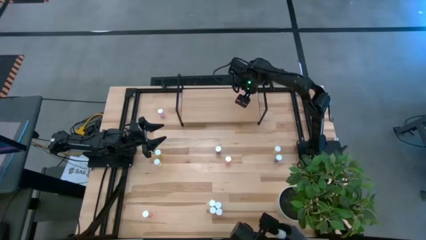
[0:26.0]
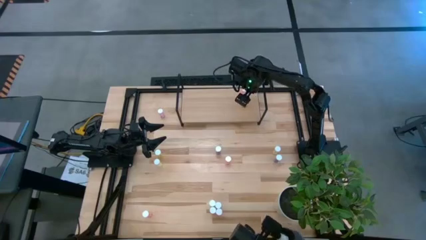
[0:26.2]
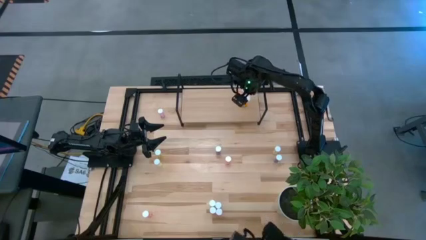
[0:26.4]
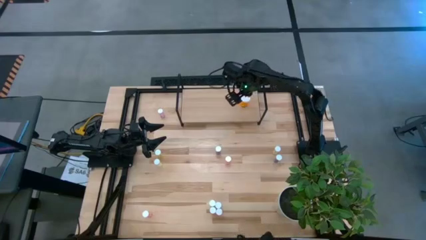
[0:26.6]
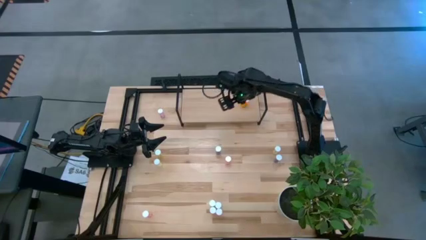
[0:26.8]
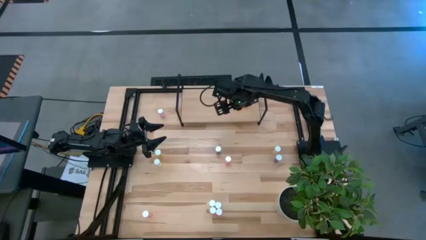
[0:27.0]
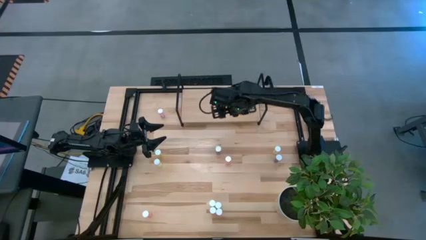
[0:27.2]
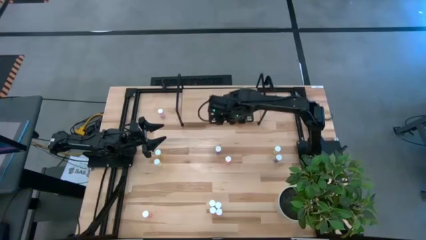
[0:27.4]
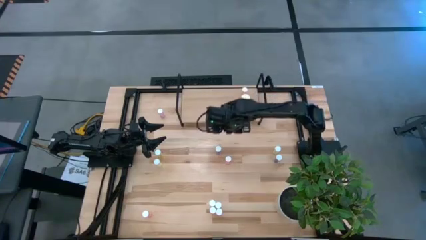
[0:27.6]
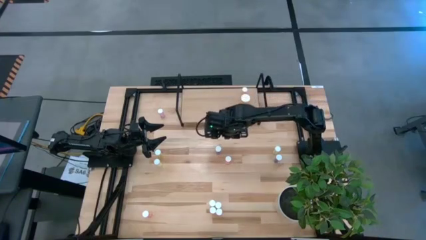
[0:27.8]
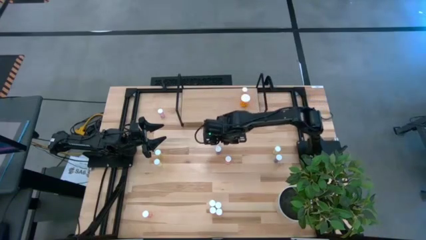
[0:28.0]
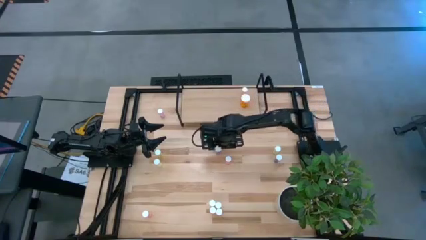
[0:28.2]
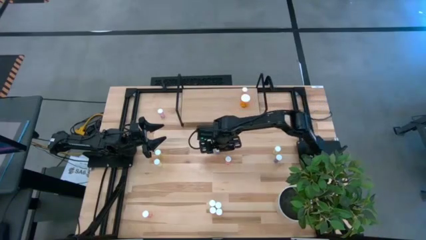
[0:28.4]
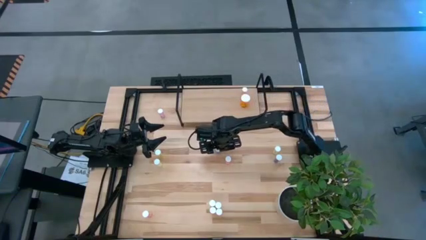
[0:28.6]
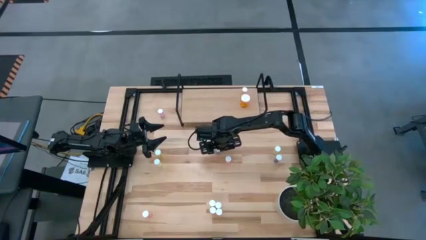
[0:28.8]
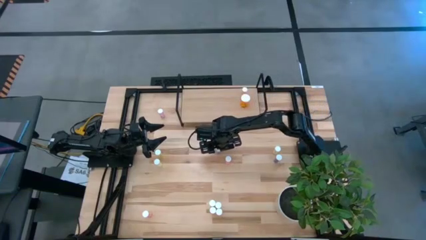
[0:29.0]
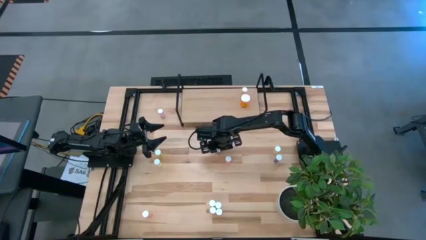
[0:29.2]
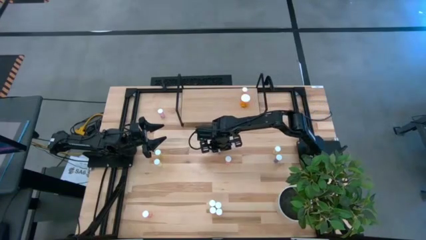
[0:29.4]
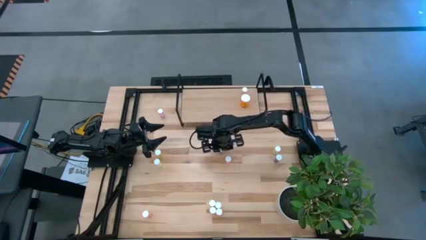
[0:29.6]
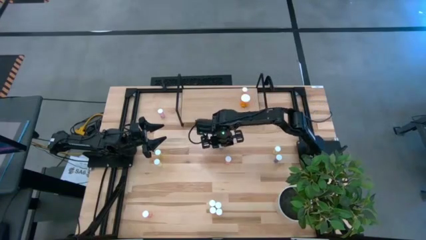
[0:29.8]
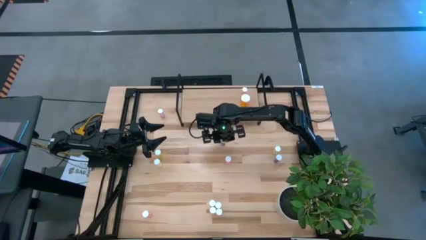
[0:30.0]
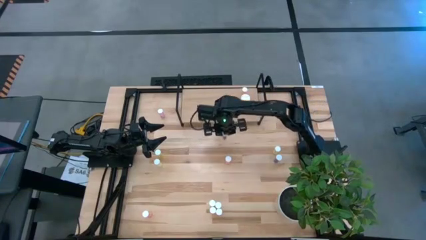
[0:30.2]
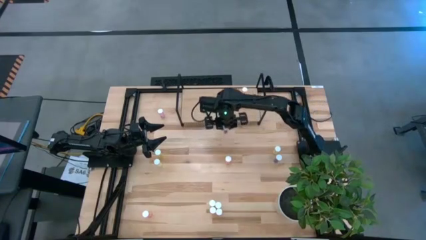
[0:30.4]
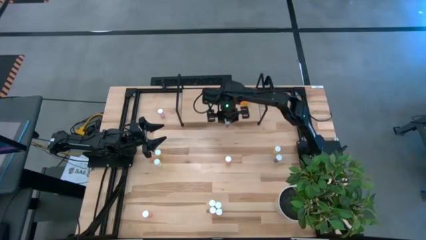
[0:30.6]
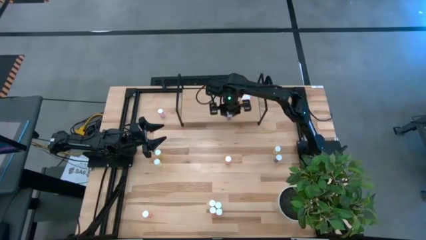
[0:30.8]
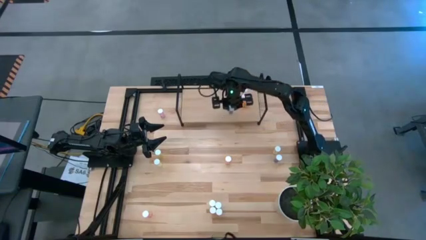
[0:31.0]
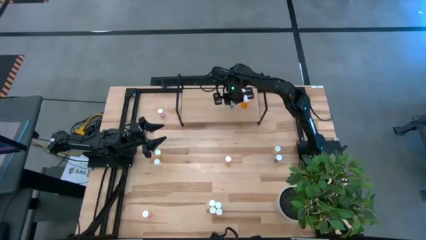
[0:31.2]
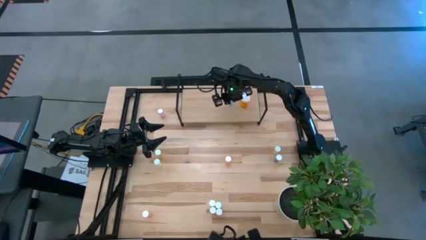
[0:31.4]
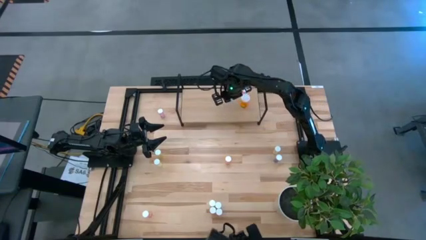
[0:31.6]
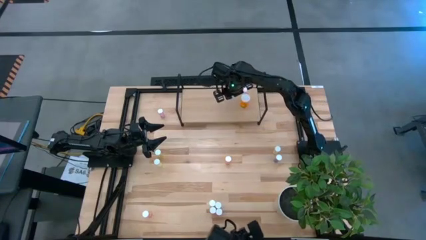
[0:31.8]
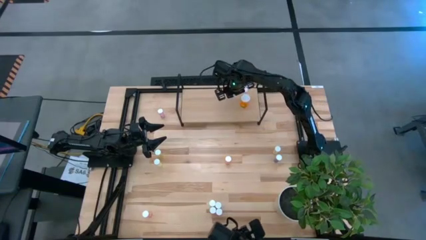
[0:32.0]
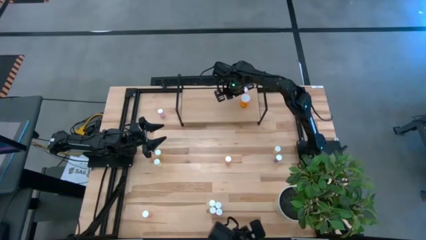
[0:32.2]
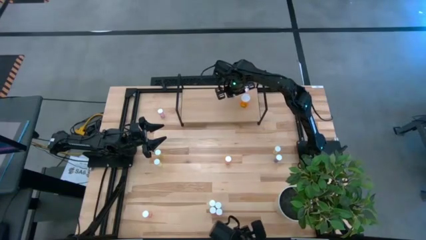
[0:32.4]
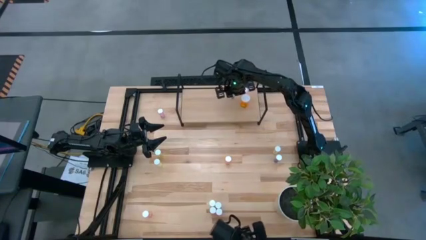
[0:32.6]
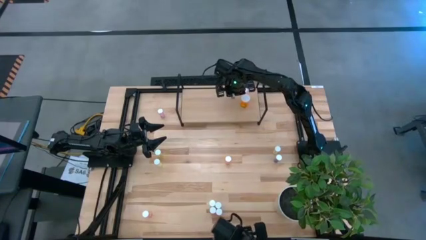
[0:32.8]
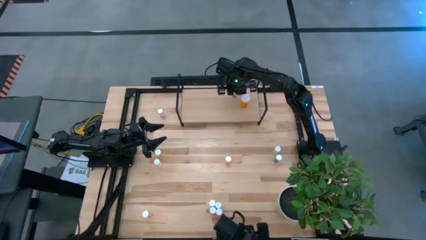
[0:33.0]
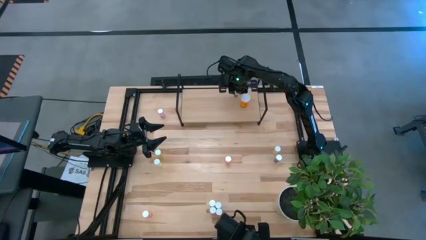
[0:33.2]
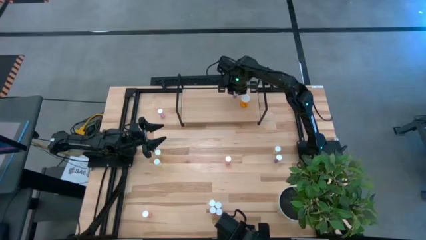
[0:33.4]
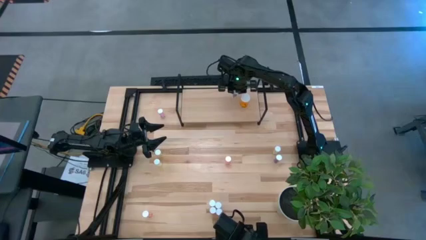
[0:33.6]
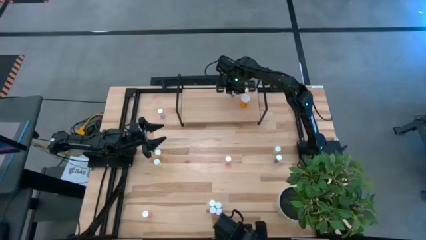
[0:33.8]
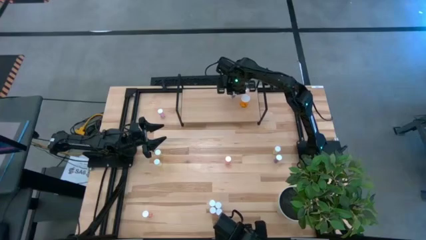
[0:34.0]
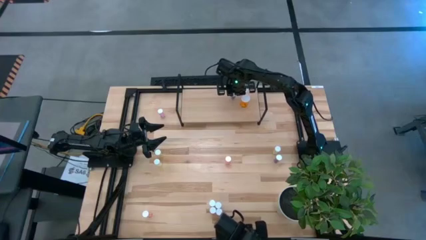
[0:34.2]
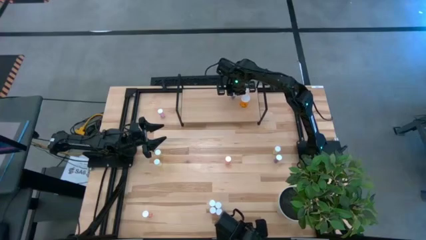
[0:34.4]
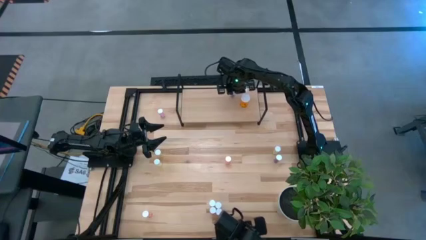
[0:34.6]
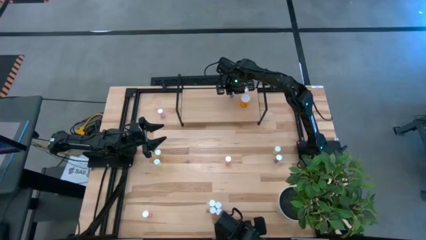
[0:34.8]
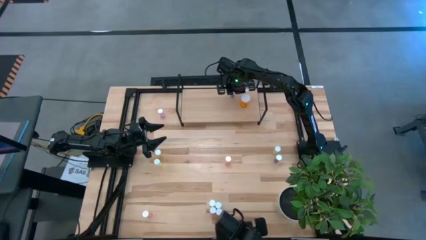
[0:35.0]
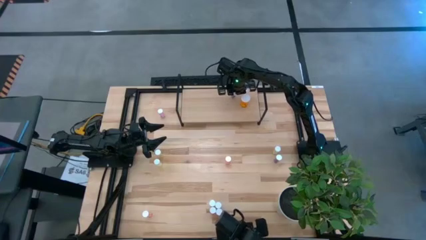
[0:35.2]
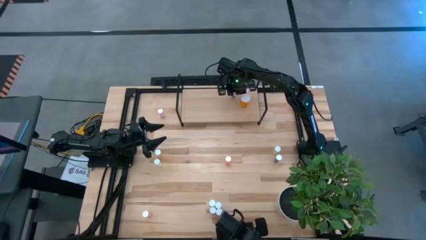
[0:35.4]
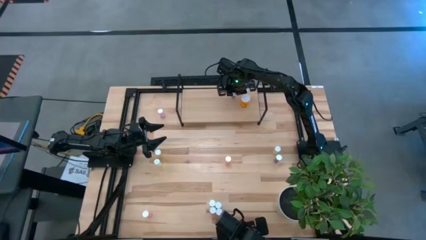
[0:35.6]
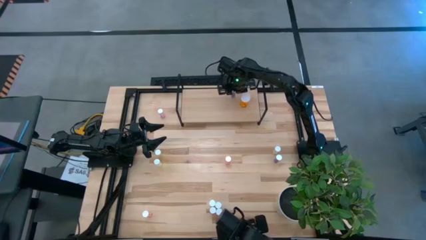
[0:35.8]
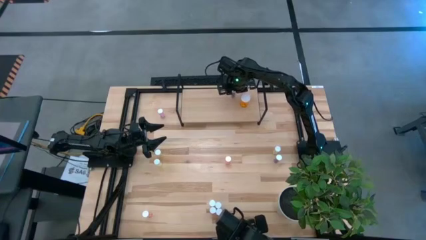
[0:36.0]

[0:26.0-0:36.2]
Task: Pick and place medicine bottles onto shelf by color
Put the blue pill bottle on the shelf

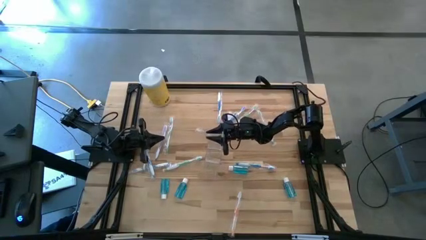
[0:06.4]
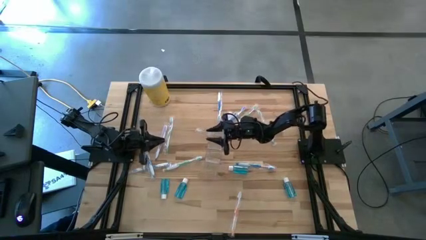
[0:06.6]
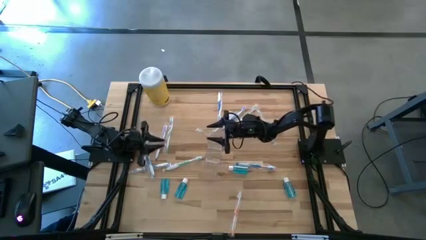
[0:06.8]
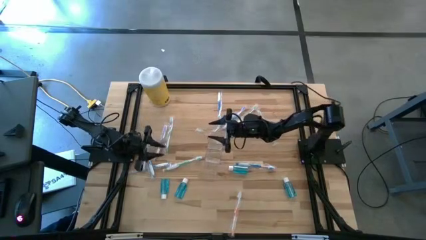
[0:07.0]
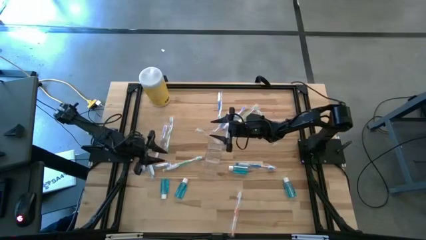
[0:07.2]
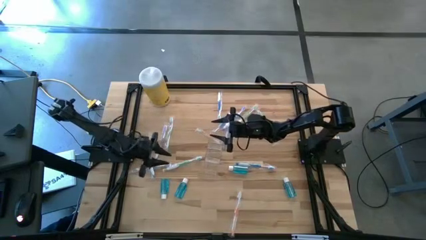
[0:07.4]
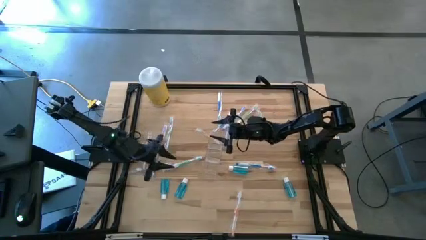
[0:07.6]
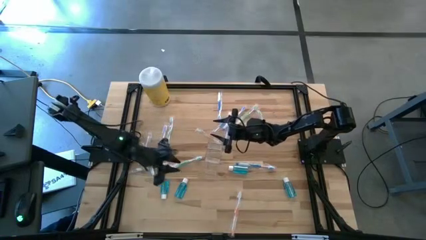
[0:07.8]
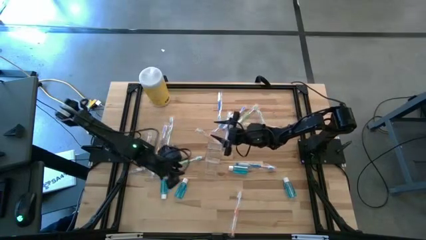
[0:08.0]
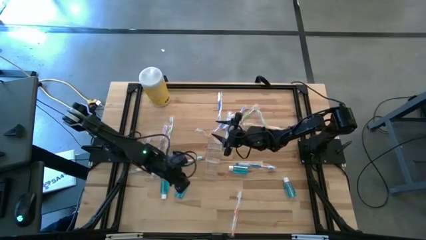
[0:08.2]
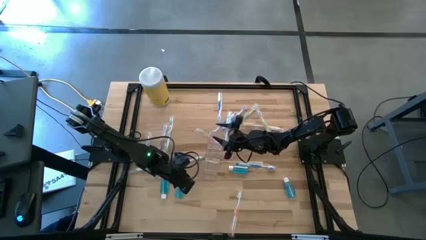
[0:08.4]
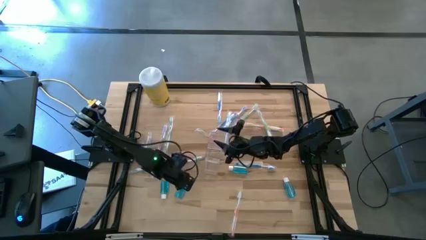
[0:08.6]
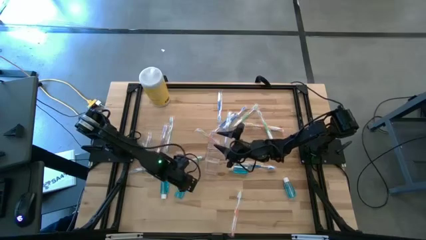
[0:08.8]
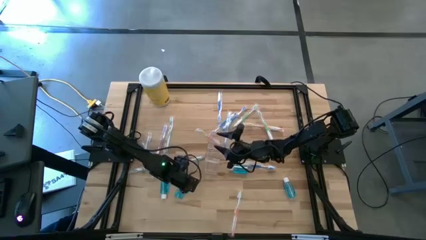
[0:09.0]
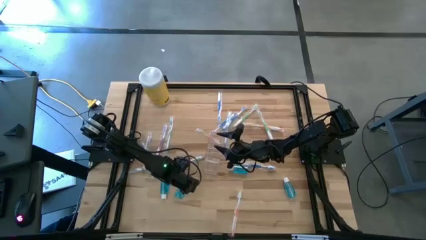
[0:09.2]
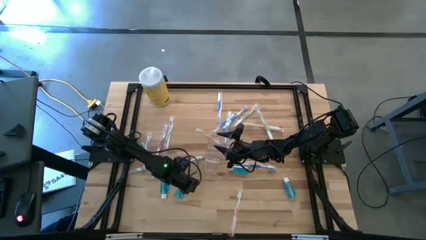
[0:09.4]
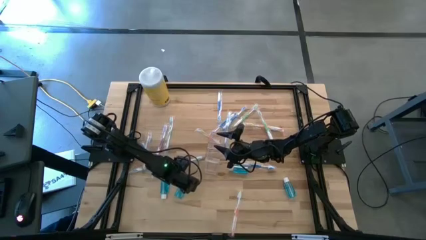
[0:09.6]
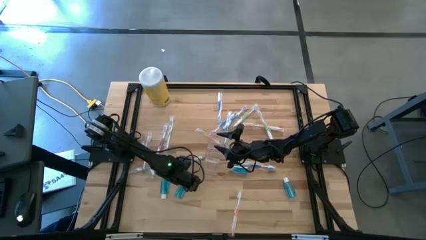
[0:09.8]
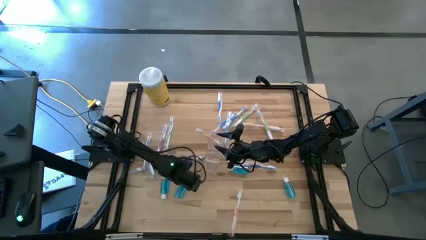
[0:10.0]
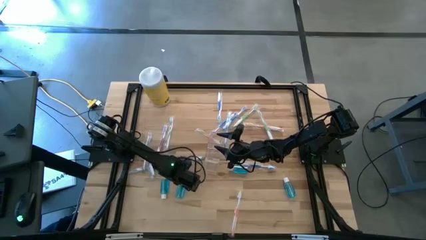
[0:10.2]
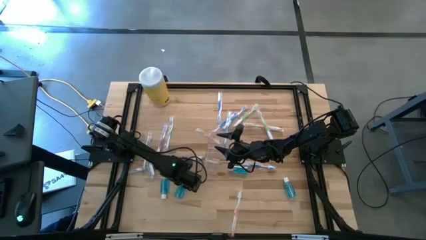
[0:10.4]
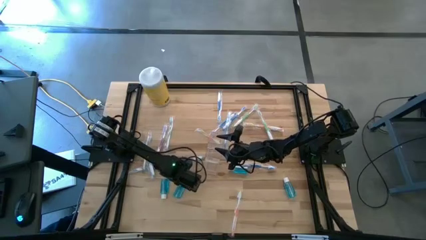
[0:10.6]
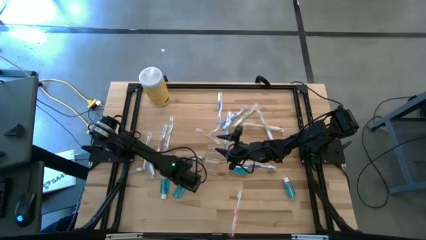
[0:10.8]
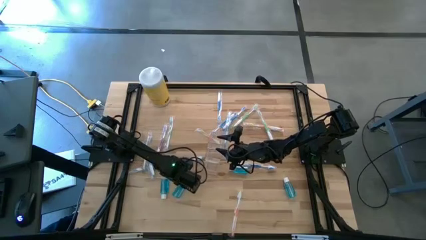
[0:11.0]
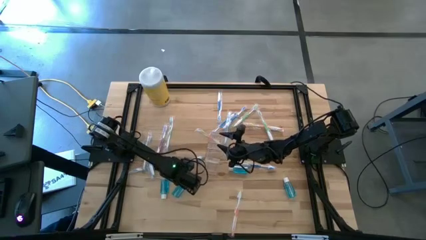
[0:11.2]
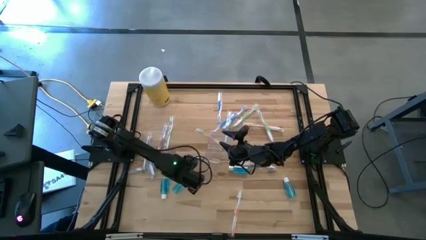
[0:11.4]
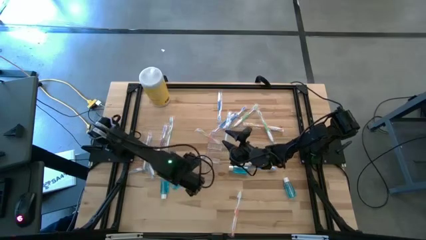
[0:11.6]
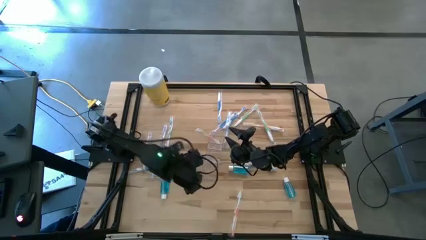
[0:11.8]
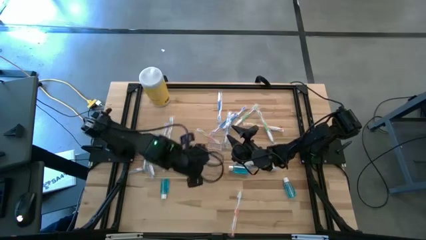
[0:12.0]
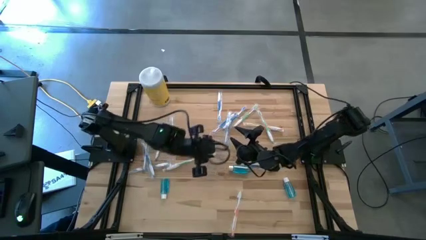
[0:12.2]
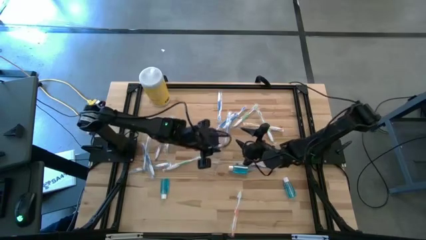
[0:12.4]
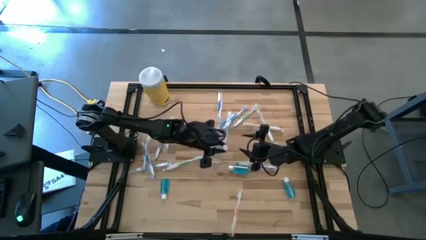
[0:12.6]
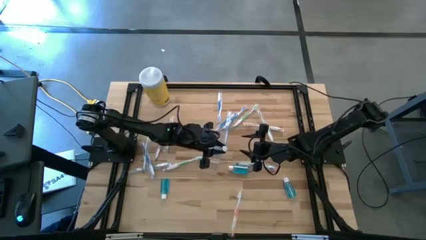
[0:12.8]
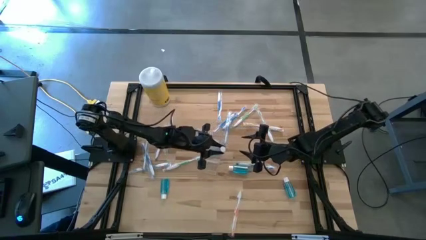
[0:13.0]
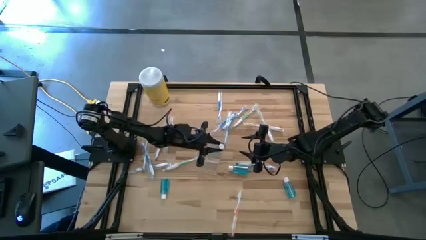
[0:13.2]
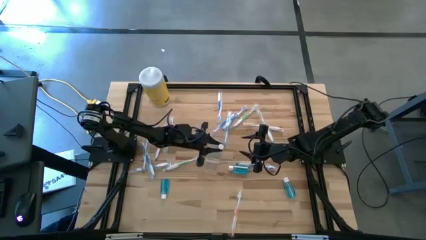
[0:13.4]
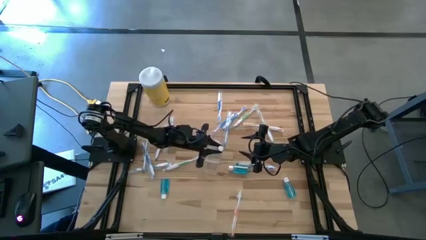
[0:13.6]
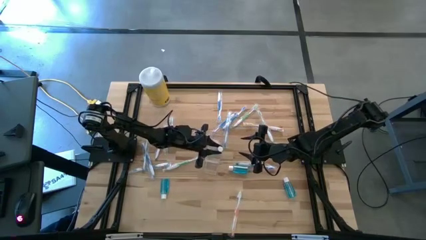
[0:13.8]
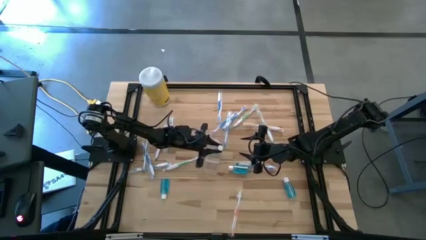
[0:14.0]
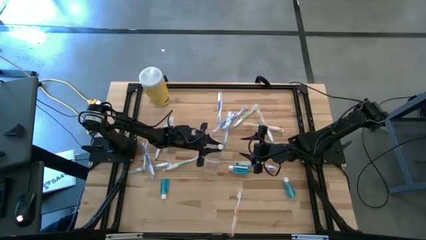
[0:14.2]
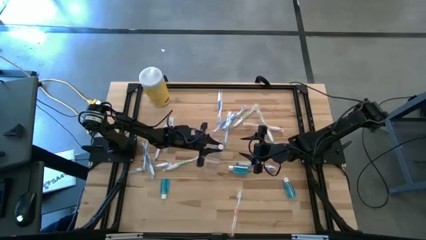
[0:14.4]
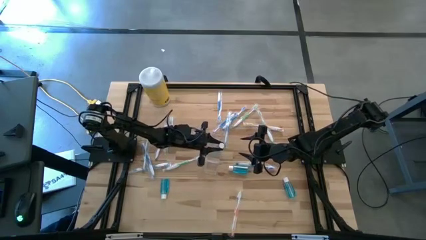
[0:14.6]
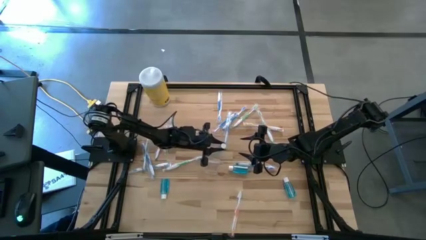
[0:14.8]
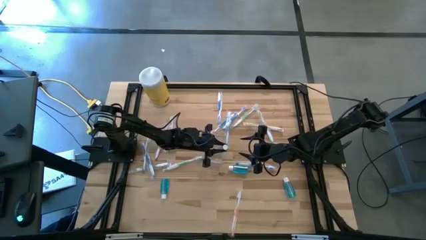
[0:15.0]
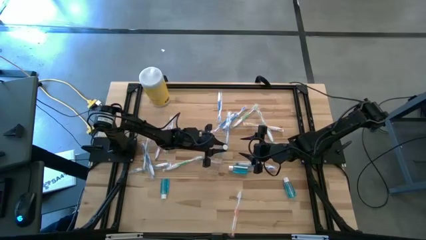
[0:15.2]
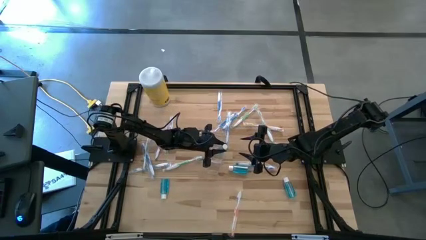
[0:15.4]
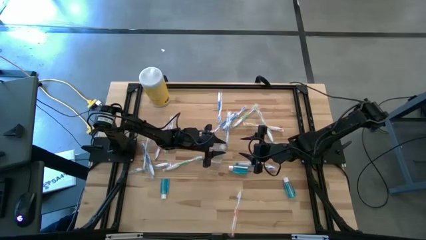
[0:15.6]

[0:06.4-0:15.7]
Task: Pick & Place toothbrushing station
Put the blue mouthwash into the transparent organizer
